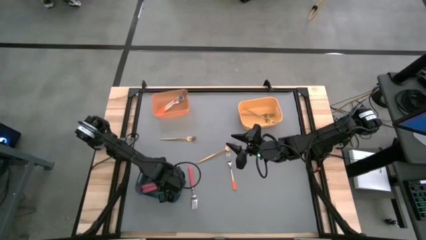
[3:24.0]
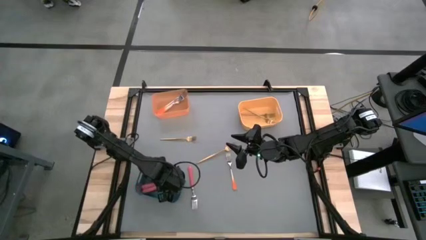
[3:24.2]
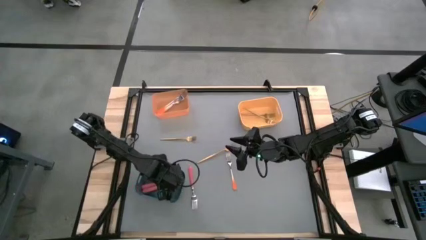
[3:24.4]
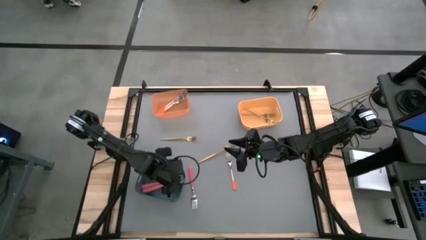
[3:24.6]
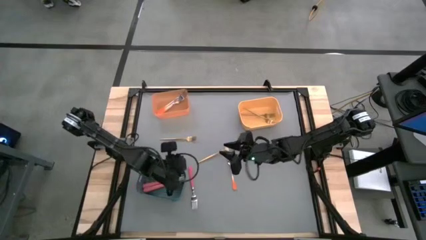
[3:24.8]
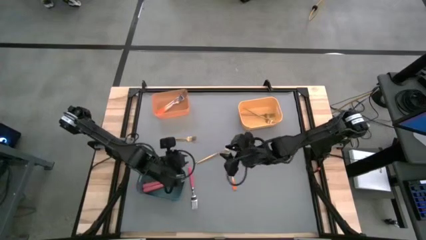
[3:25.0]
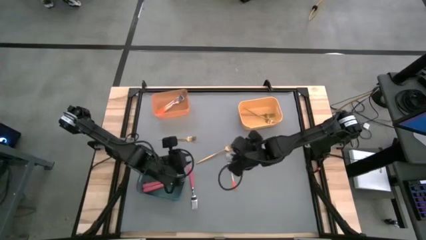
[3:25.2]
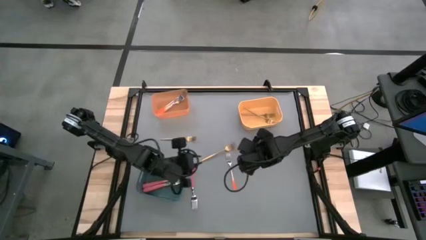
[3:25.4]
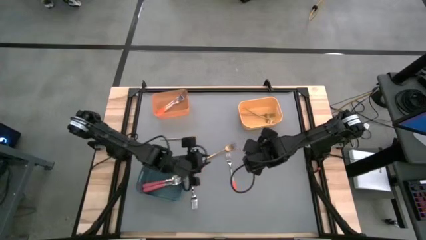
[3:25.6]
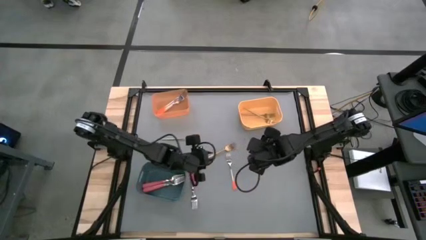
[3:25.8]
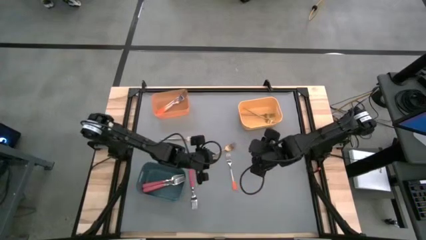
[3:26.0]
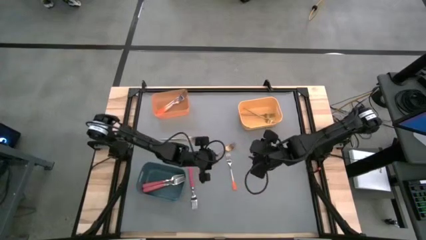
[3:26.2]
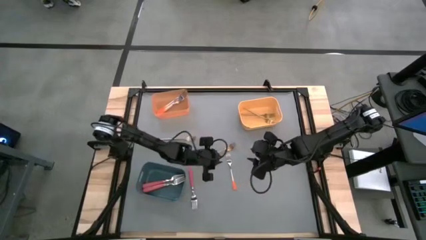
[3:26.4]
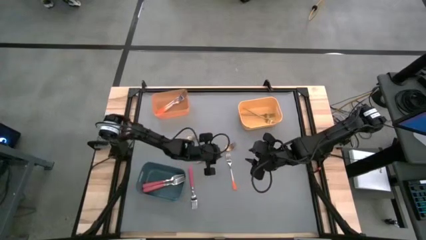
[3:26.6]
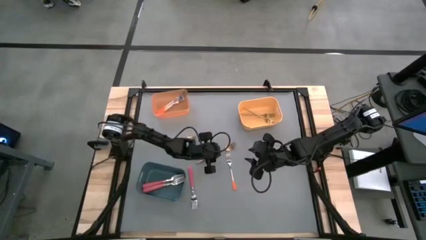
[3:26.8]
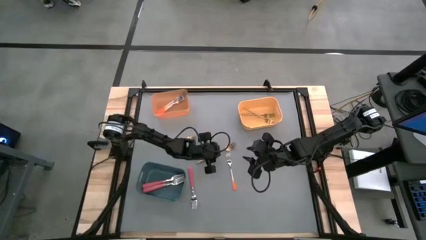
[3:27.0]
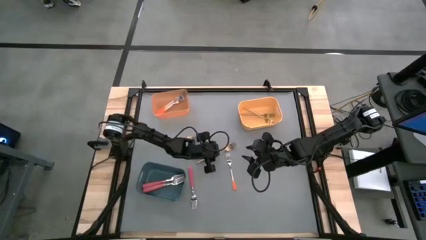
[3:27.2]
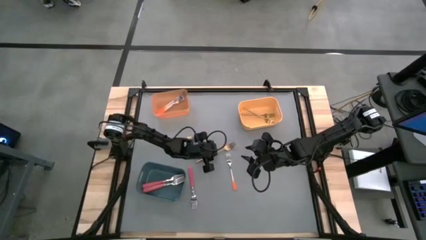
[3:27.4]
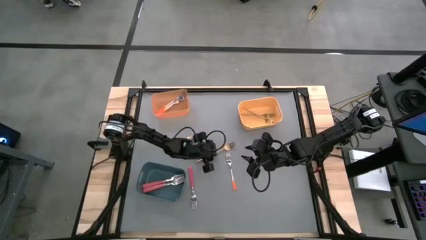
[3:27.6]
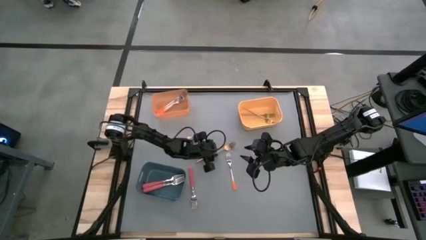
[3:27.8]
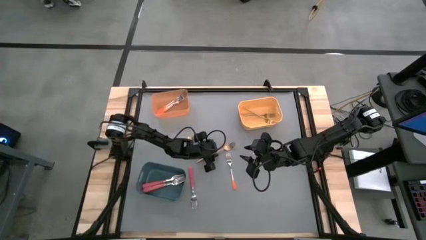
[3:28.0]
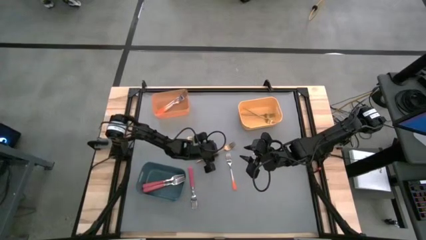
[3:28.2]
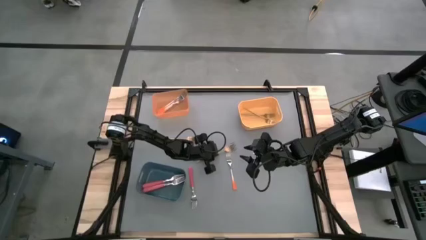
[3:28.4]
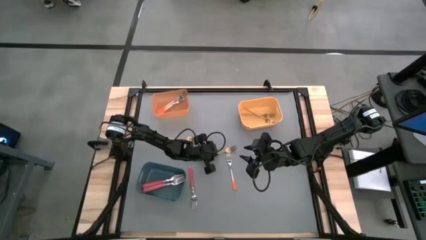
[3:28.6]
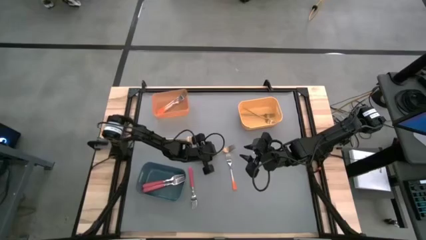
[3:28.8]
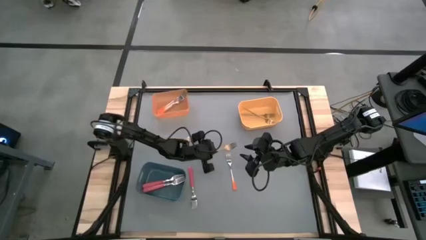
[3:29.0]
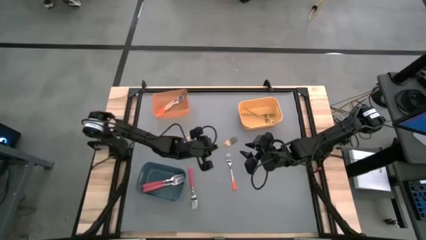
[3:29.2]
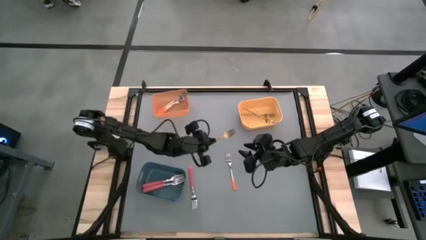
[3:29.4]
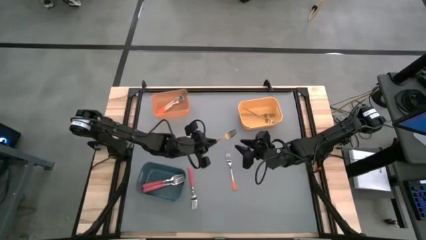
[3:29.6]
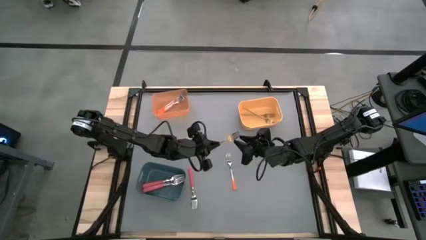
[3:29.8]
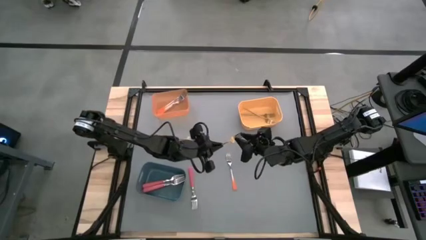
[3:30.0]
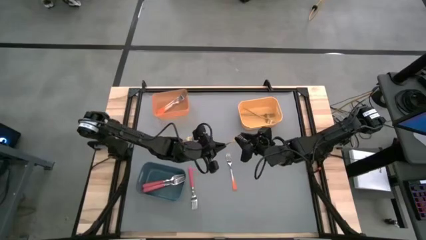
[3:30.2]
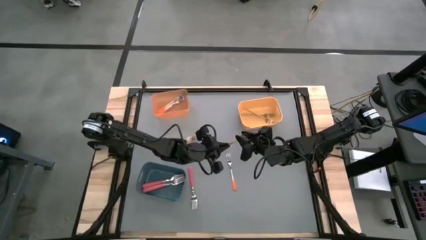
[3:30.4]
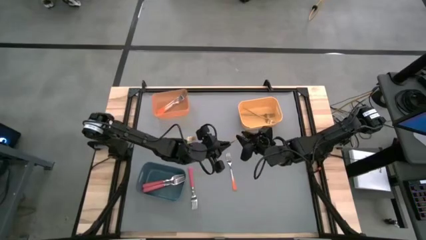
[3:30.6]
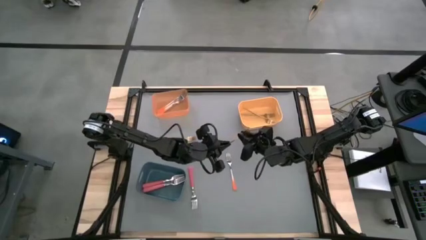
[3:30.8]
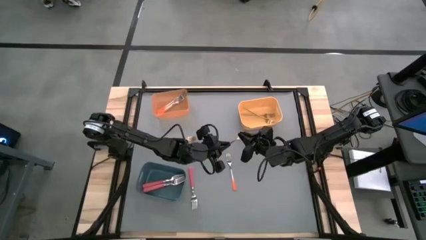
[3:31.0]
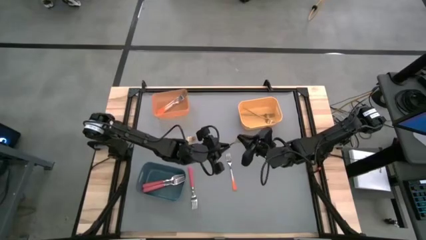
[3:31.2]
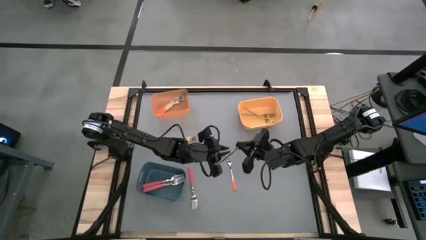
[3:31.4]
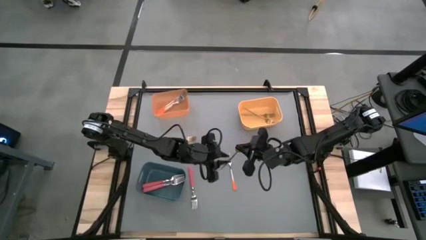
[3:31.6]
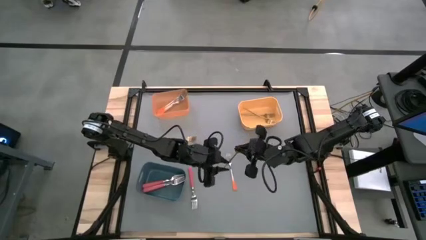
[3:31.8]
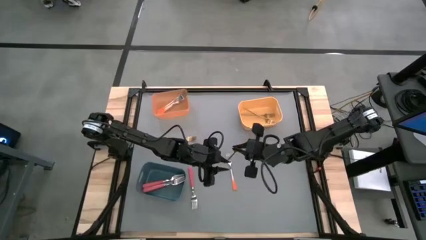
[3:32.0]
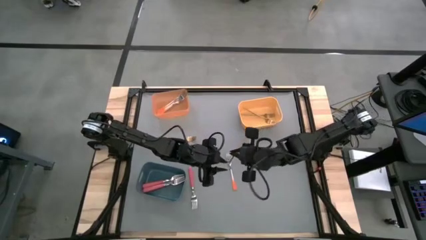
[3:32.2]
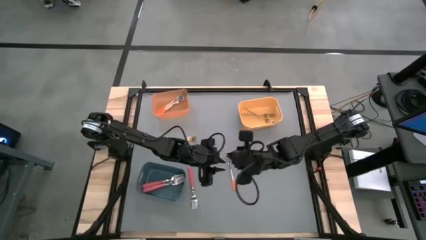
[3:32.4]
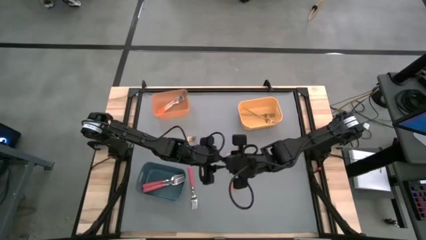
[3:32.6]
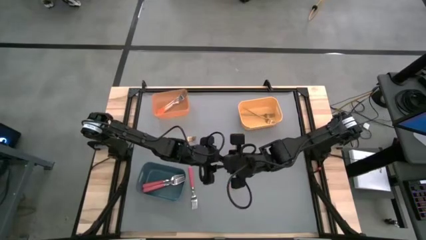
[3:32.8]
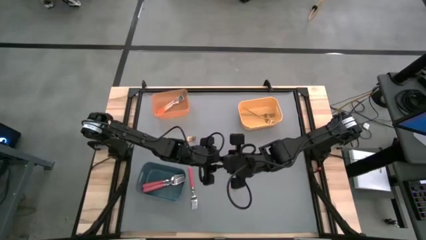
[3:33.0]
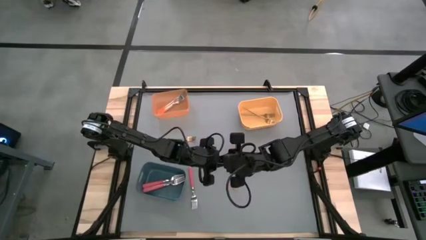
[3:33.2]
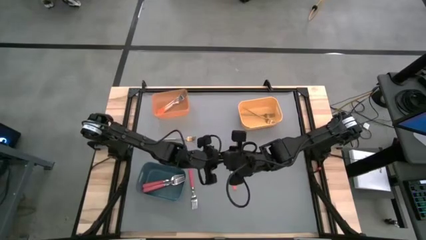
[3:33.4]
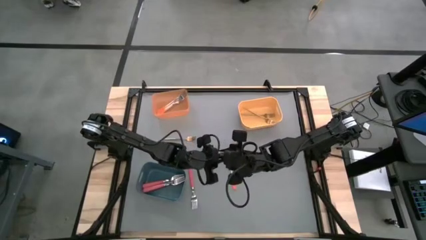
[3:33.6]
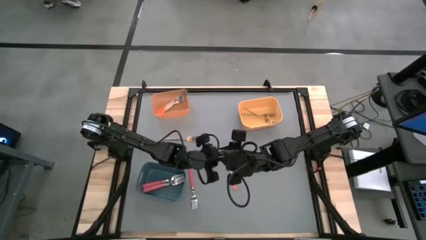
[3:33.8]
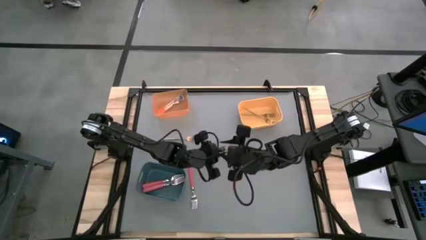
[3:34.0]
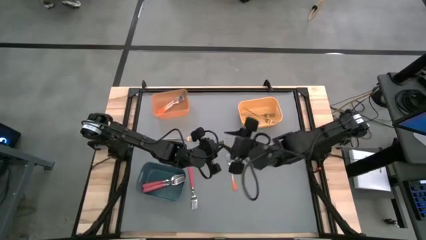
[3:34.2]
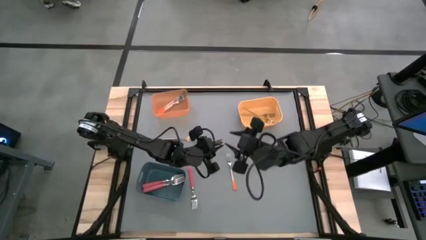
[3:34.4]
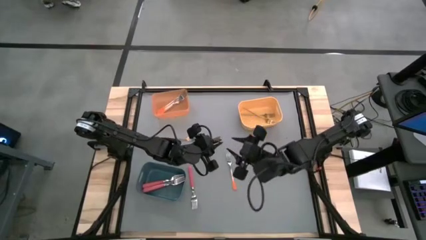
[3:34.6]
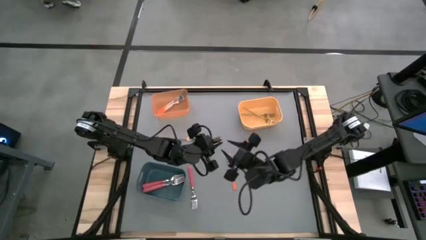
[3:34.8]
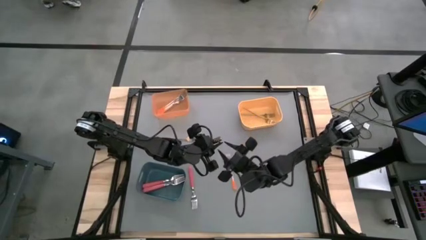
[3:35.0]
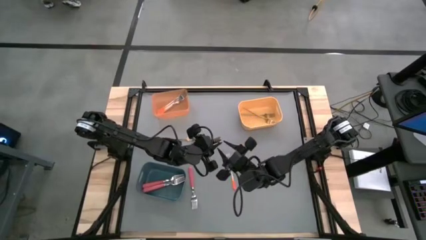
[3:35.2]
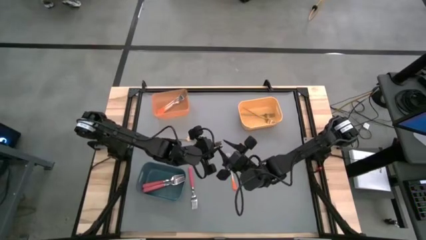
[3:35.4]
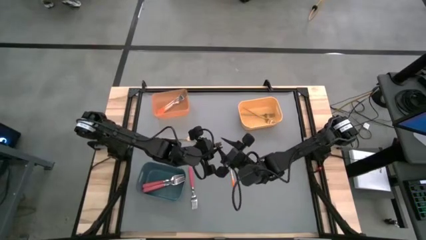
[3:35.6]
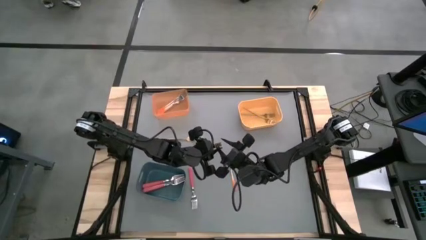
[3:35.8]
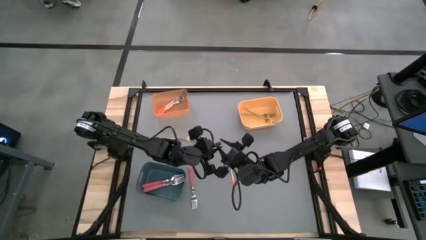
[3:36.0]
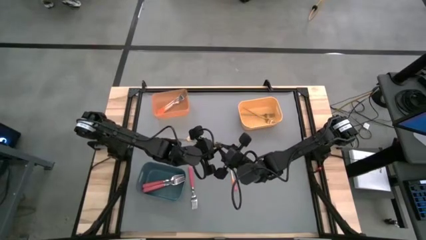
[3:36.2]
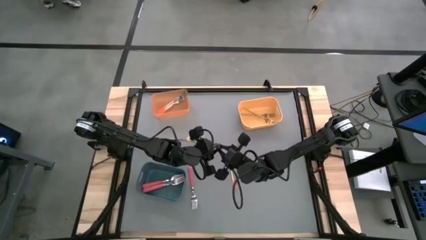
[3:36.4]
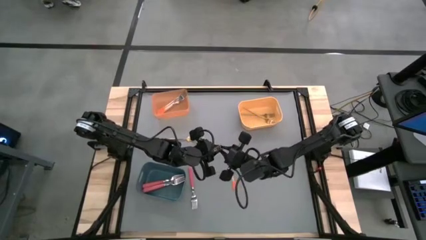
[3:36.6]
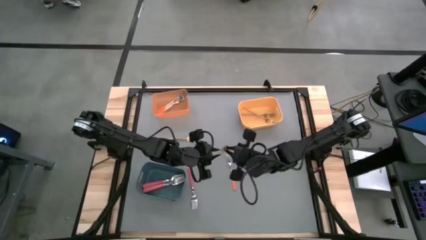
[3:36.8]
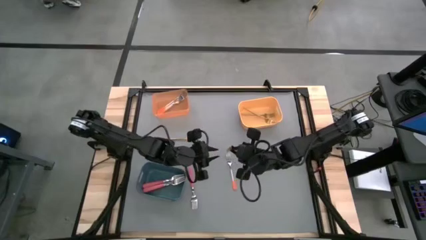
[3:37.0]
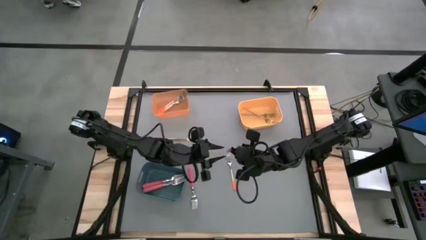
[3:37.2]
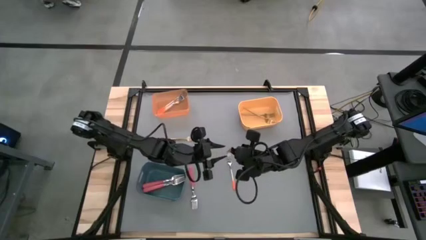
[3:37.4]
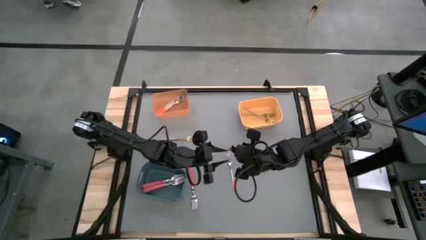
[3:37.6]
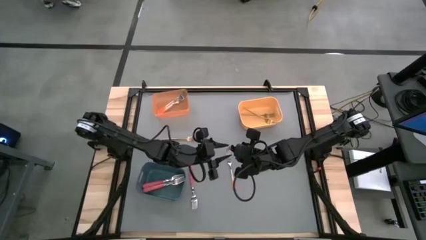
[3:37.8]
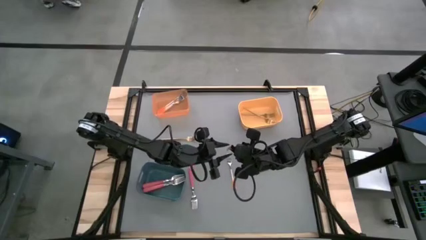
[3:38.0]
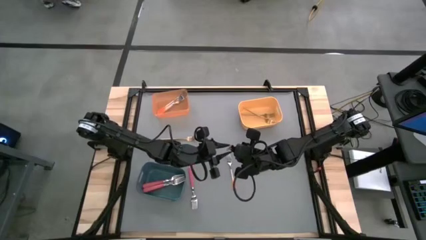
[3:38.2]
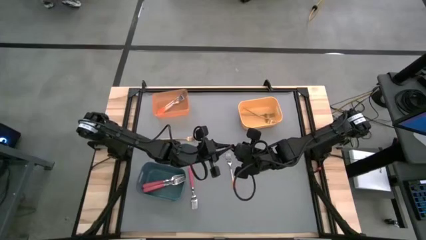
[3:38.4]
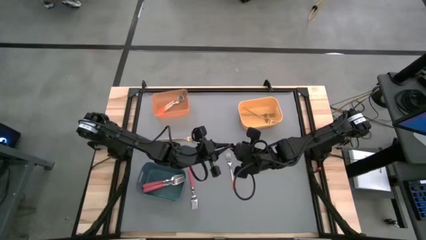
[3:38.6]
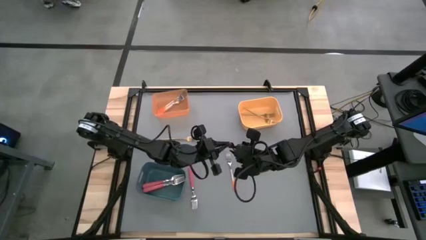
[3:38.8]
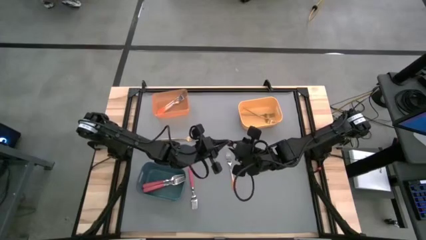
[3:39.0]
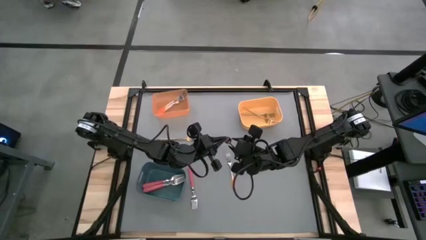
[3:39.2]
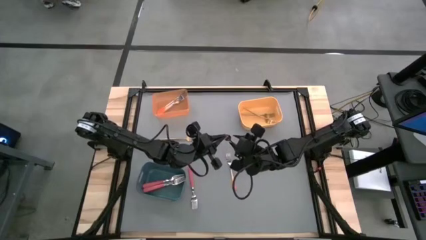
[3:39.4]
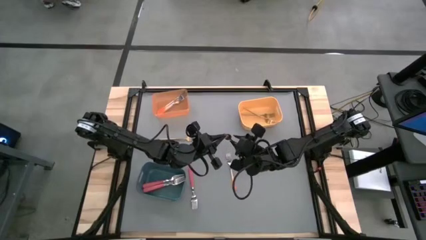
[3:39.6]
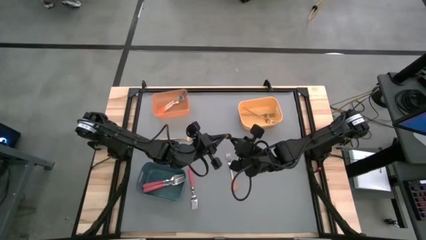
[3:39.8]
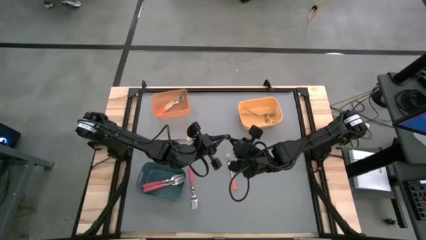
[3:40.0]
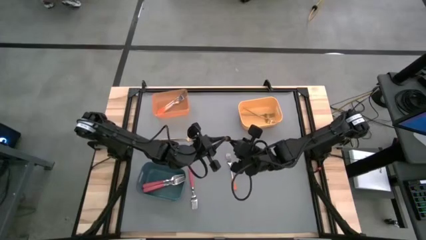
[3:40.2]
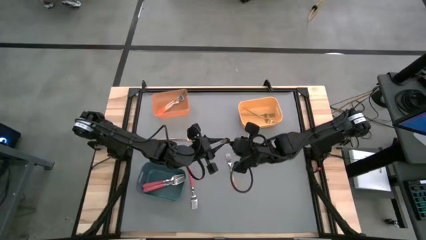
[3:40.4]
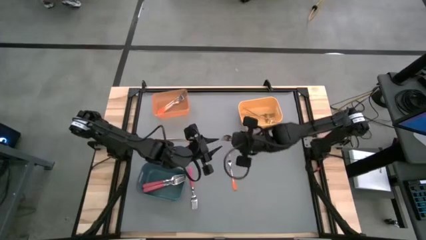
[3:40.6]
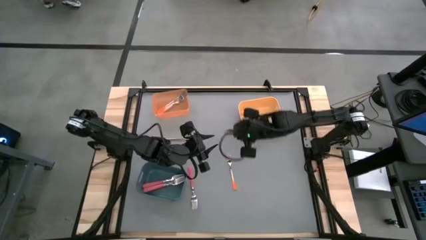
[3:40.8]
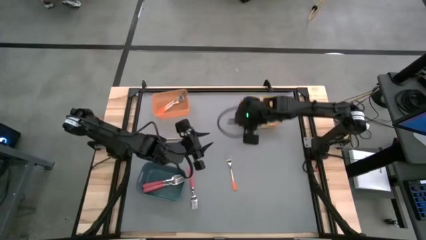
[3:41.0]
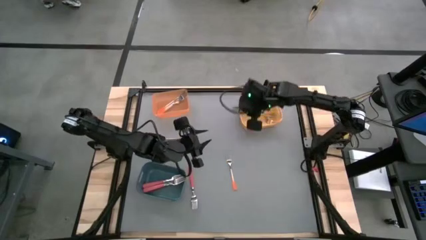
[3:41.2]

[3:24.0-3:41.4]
Task: Sort silverware by color (type)
Put the gold fork into the yellow bin
